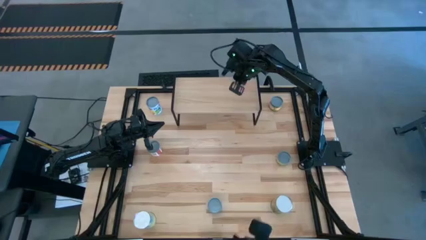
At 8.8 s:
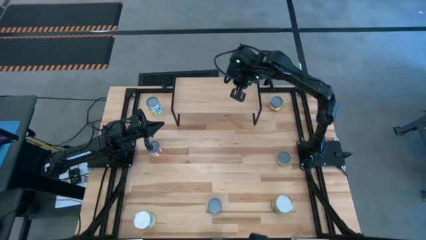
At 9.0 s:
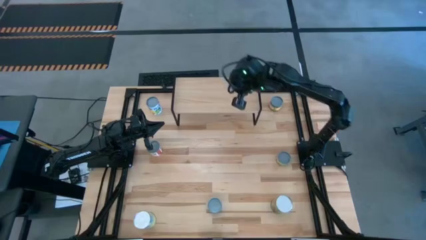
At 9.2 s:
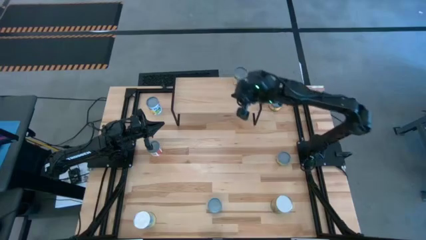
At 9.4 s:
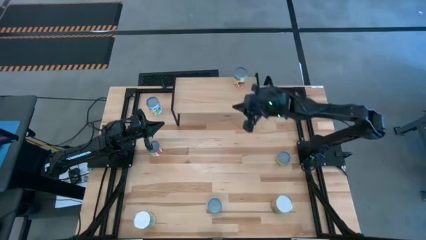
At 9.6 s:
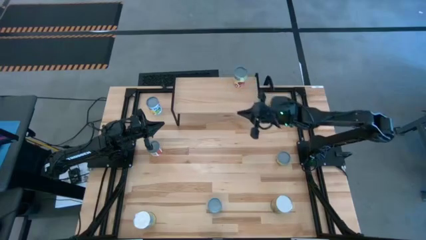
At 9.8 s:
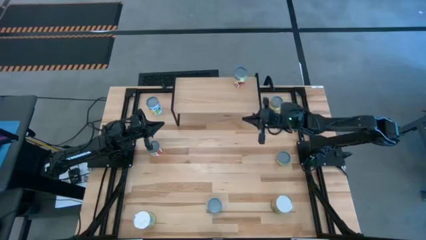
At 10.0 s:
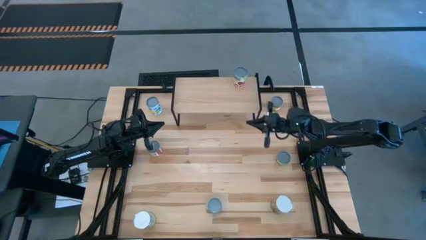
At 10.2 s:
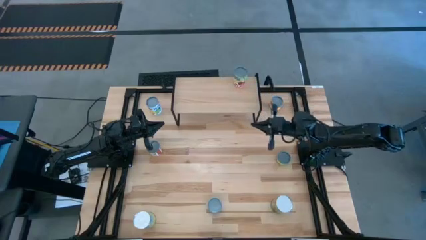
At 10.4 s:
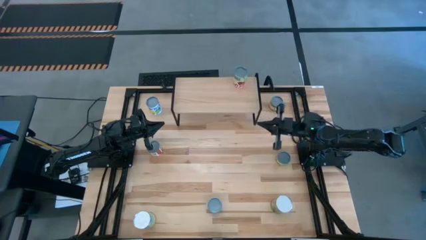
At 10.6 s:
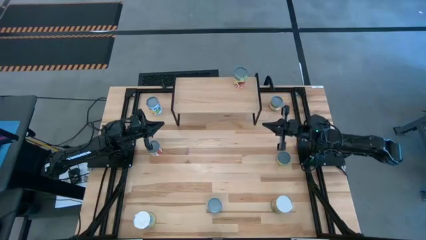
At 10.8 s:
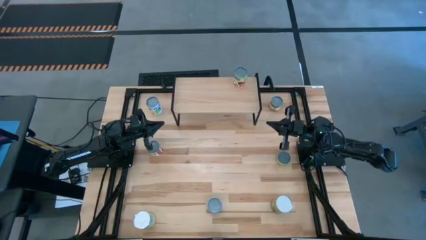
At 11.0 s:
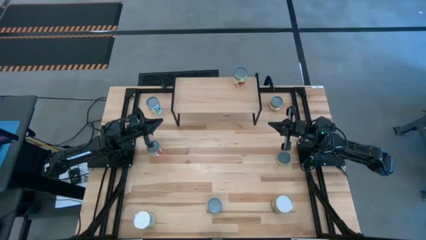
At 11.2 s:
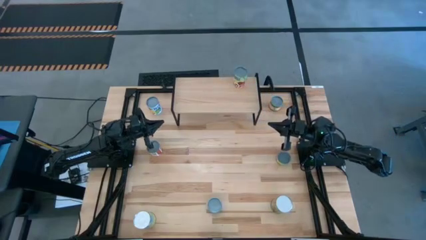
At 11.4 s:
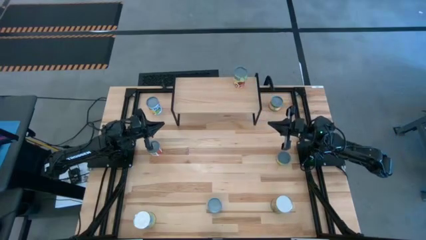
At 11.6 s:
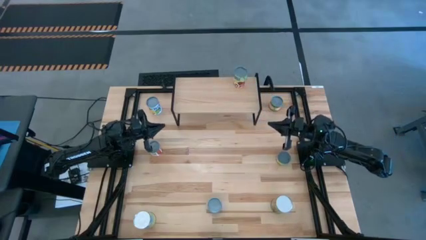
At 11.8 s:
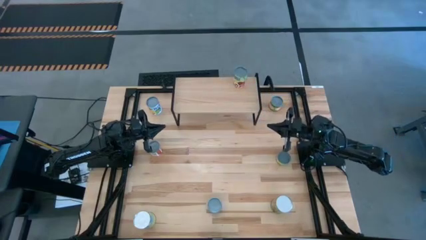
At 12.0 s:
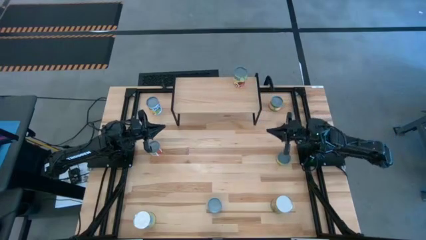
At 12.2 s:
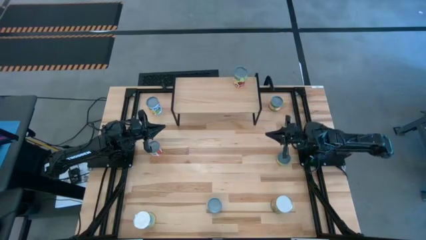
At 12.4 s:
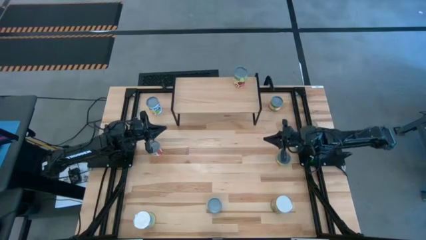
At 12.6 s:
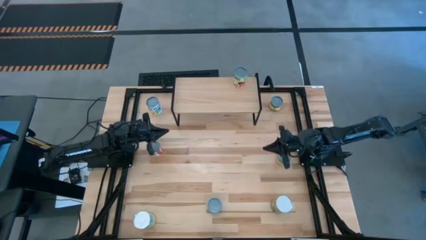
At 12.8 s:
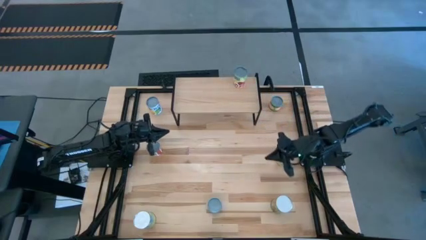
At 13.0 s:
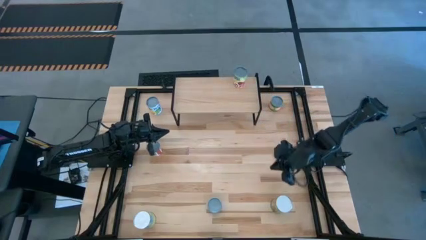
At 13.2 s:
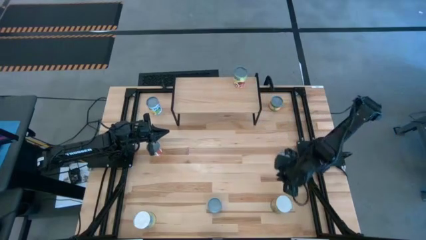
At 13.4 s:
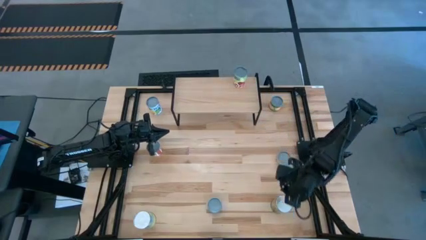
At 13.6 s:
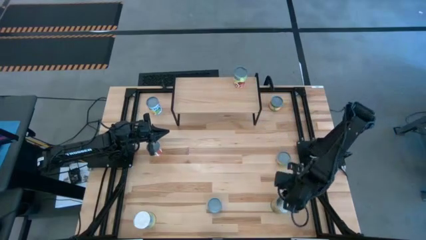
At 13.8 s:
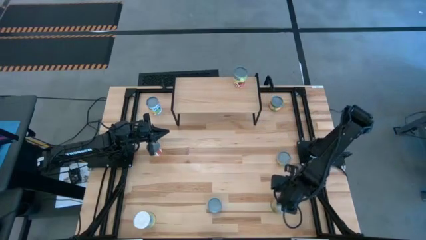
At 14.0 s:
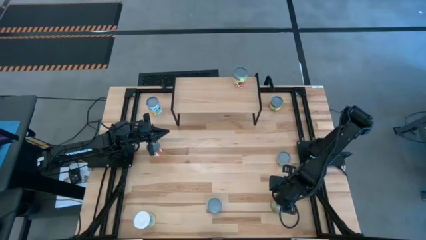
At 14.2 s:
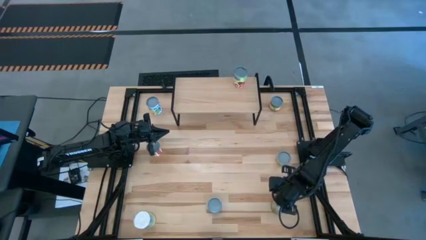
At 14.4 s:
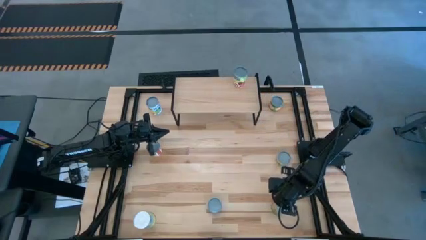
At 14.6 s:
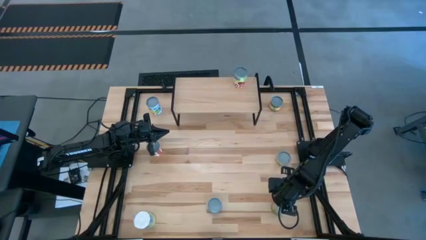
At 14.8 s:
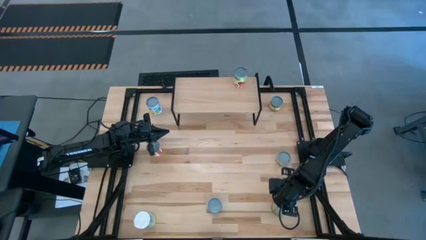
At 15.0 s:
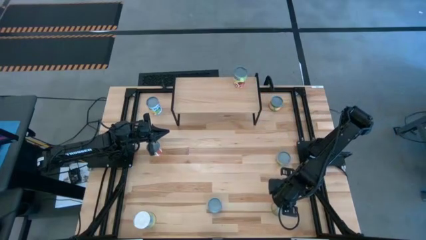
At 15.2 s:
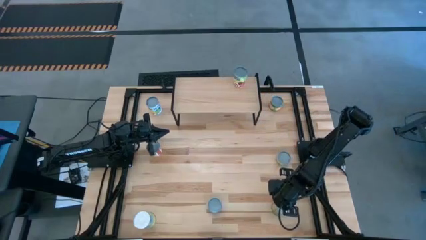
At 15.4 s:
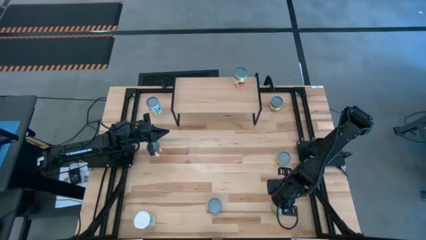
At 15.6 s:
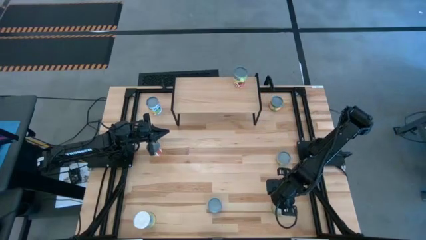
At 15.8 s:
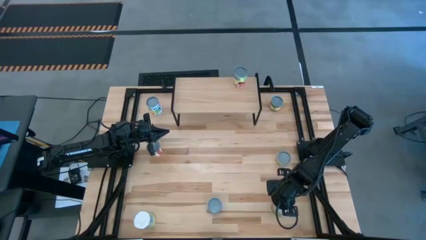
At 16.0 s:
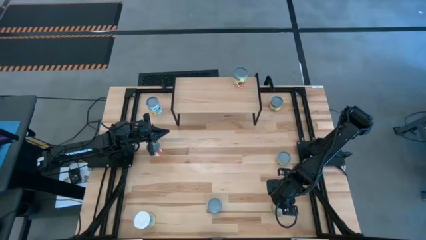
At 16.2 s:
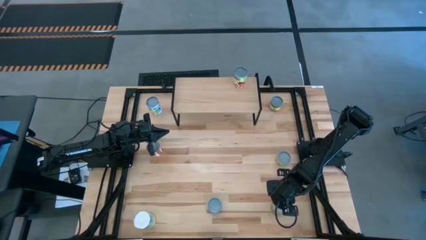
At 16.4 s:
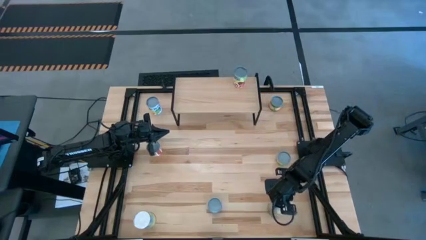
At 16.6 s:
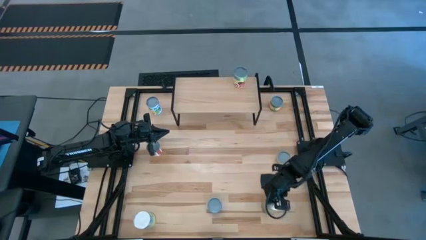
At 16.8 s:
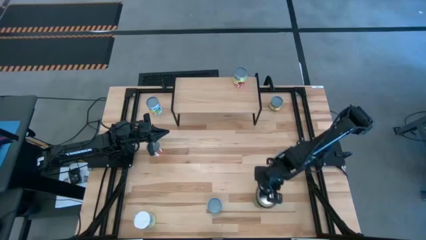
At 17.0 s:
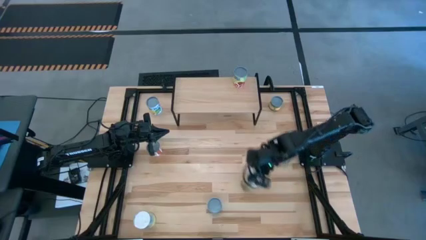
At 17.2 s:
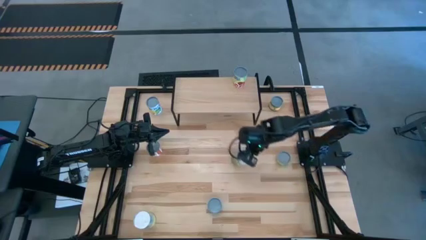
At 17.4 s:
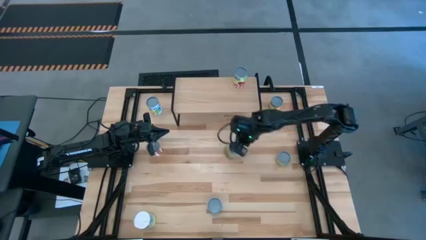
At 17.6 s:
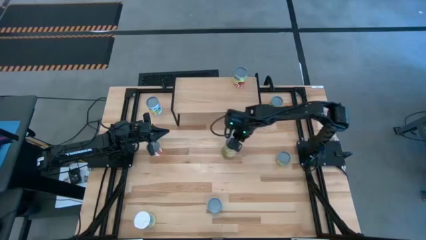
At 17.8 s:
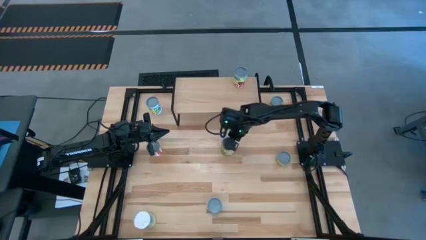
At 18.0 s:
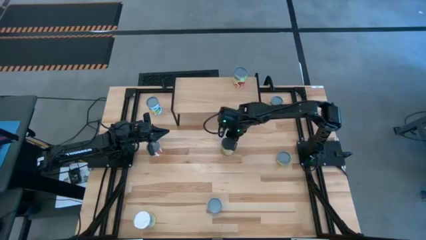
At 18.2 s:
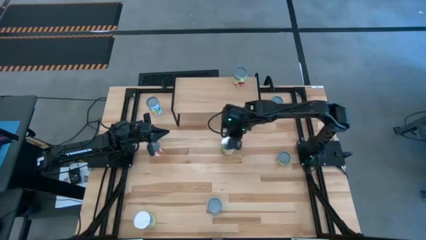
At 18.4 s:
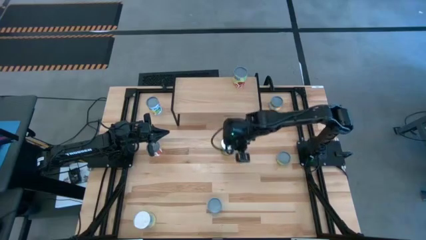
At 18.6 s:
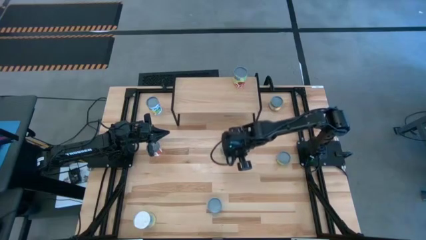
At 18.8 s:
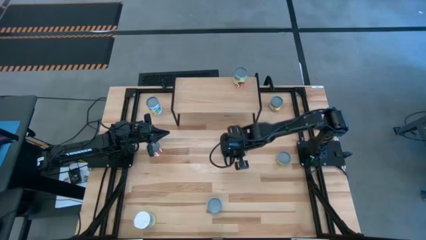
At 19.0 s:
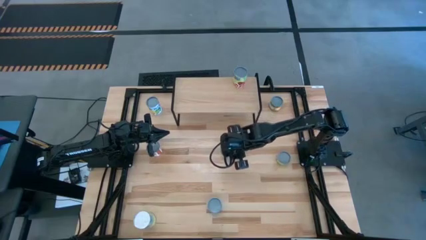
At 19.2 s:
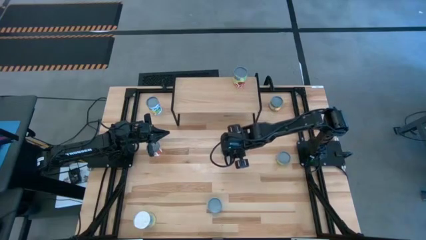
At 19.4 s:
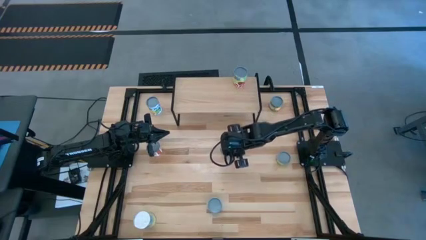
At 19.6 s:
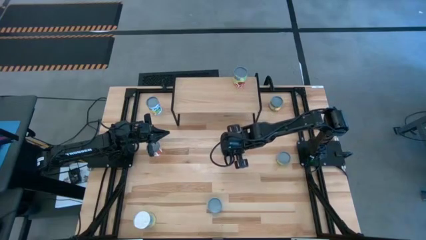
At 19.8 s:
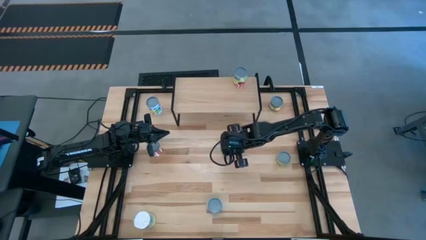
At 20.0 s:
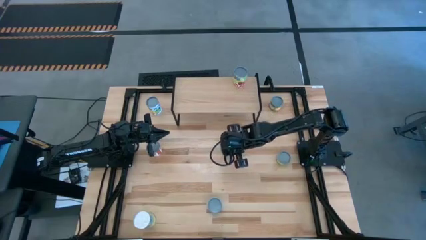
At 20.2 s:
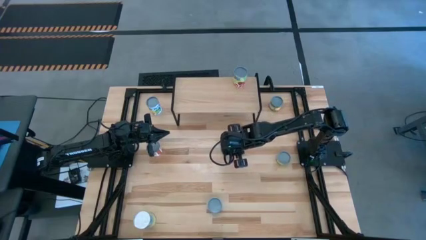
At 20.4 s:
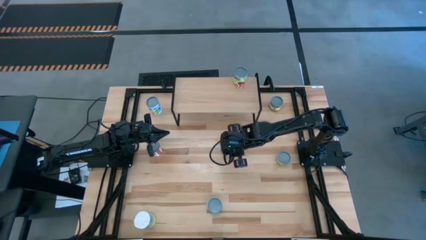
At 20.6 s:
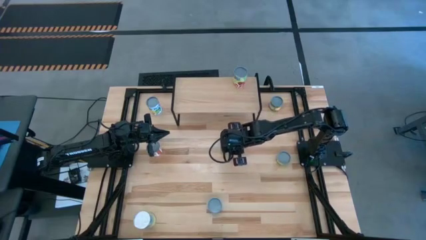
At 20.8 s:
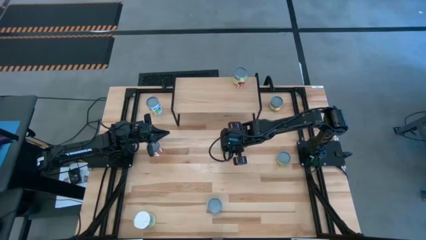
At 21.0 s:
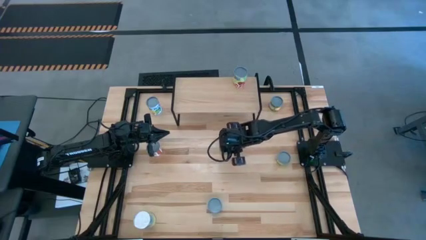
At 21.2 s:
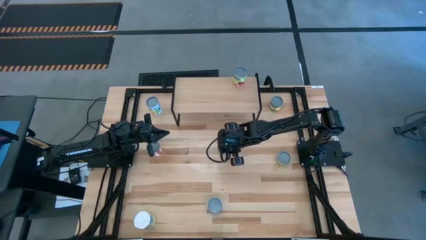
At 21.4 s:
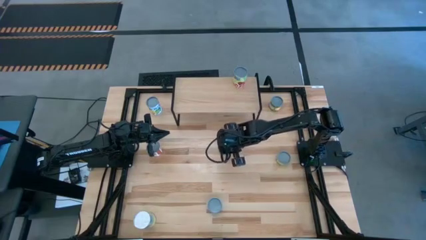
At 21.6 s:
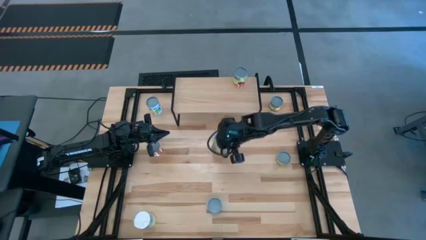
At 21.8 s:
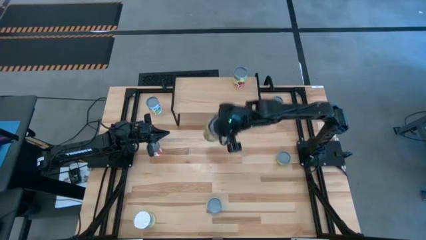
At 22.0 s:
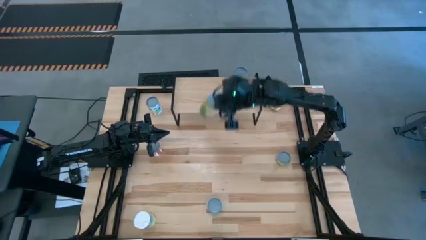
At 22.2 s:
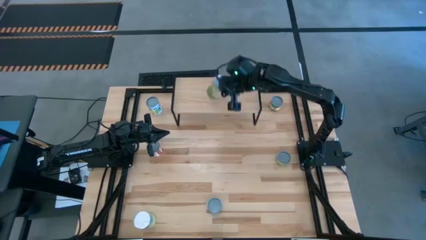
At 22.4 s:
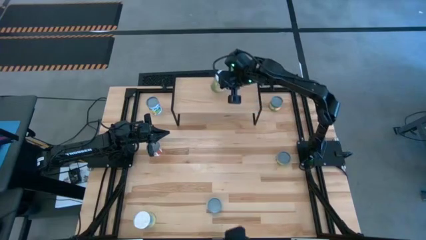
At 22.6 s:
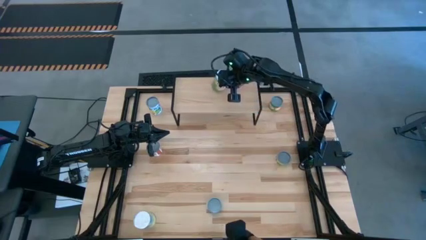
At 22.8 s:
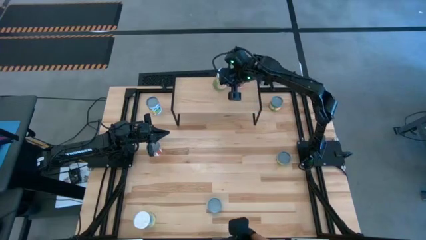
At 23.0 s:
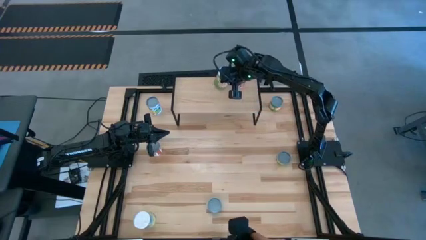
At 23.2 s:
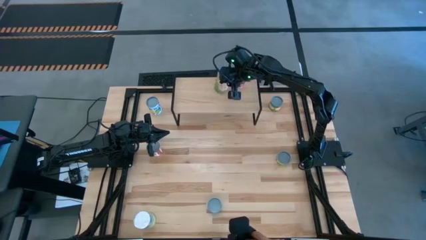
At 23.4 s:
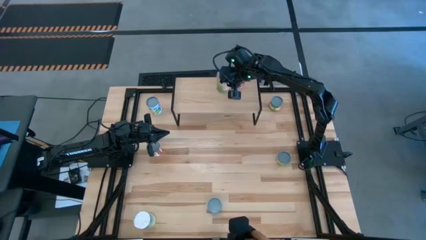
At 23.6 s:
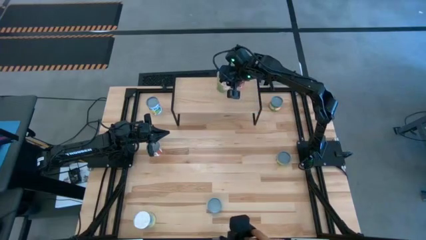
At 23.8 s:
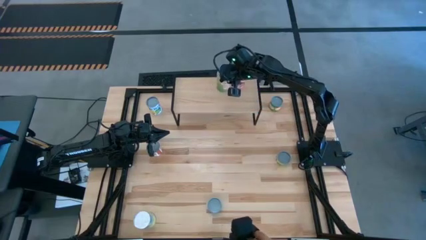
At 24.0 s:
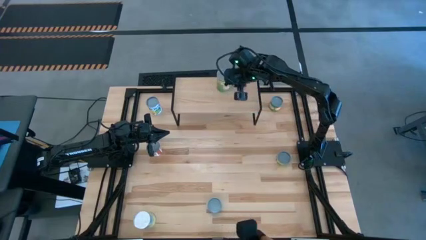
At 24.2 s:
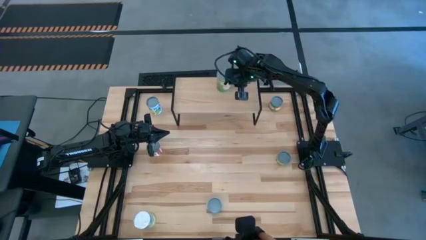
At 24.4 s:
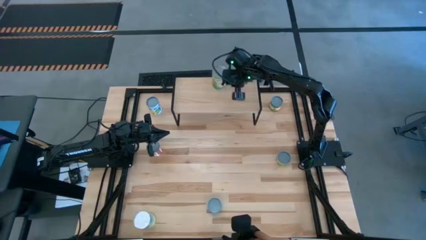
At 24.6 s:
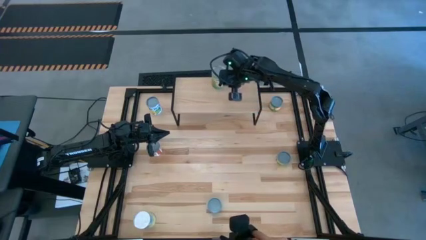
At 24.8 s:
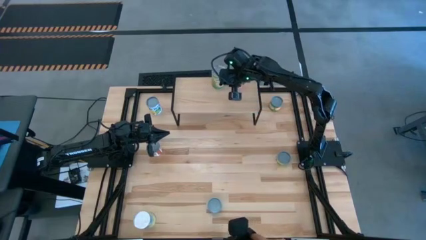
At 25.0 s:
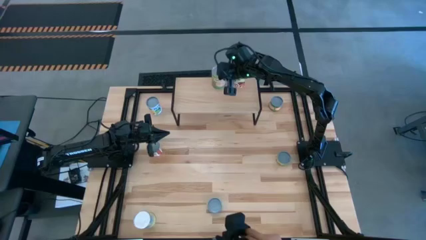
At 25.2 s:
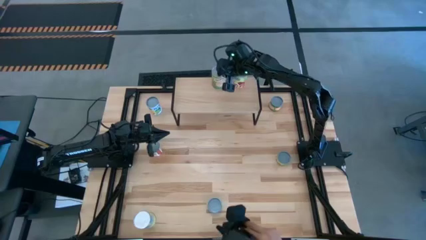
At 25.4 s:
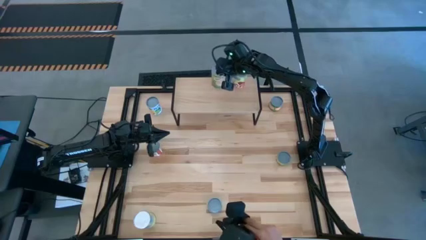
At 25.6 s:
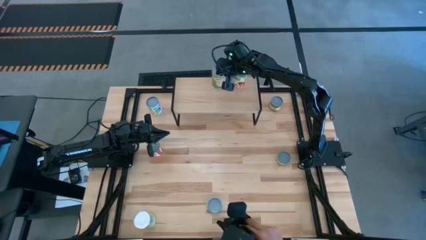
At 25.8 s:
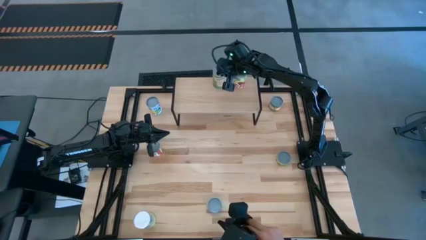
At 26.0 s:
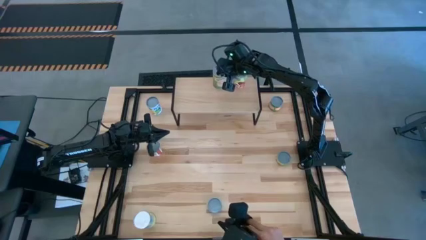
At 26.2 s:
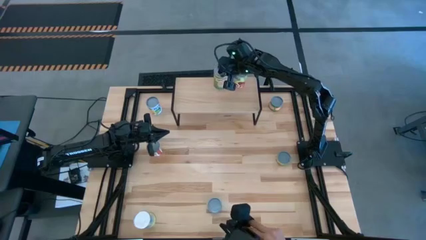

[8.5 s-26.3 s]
Task: Pick and place cans onto a shelf
Put the canned oranges on the shelf
